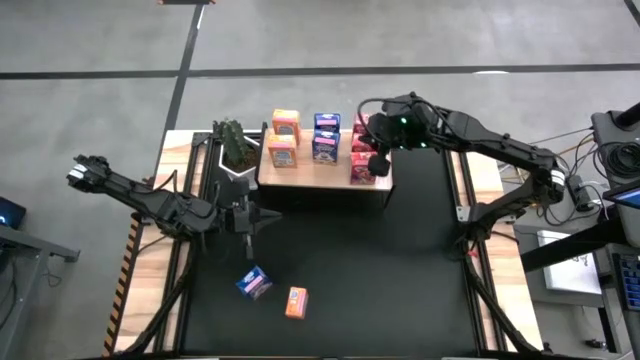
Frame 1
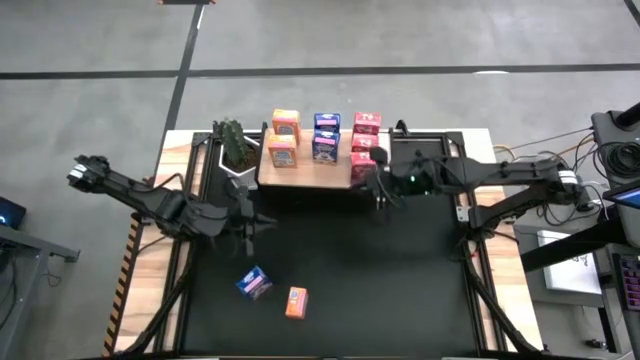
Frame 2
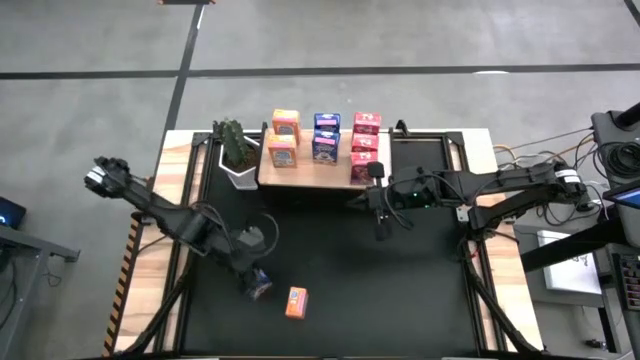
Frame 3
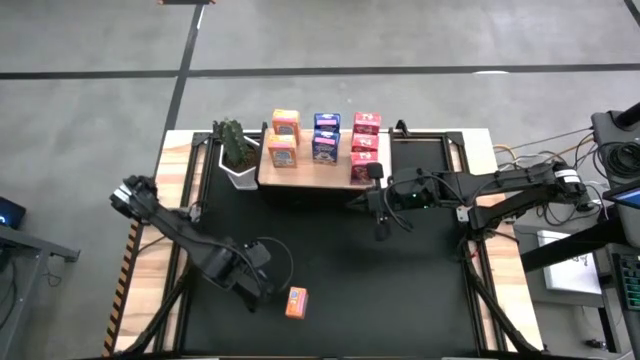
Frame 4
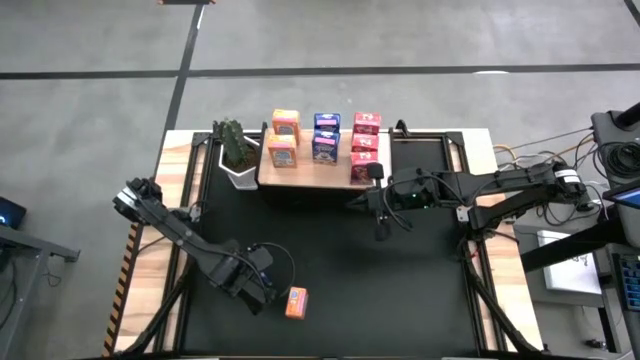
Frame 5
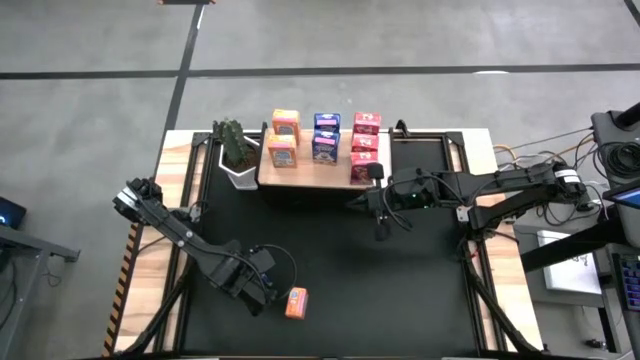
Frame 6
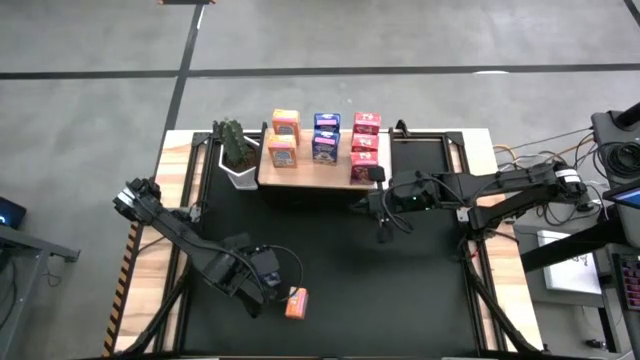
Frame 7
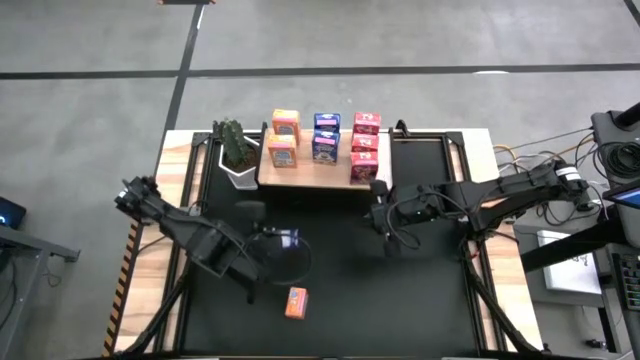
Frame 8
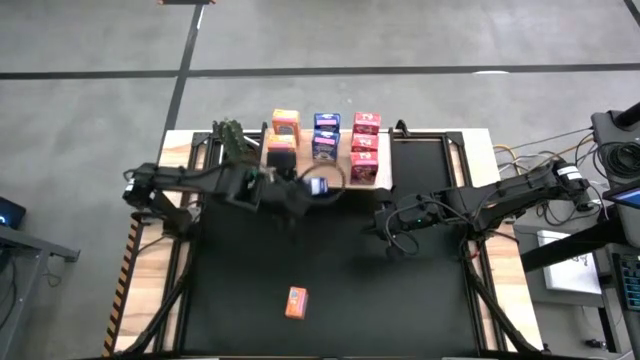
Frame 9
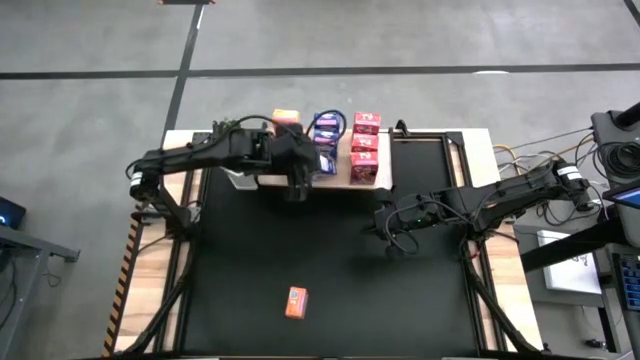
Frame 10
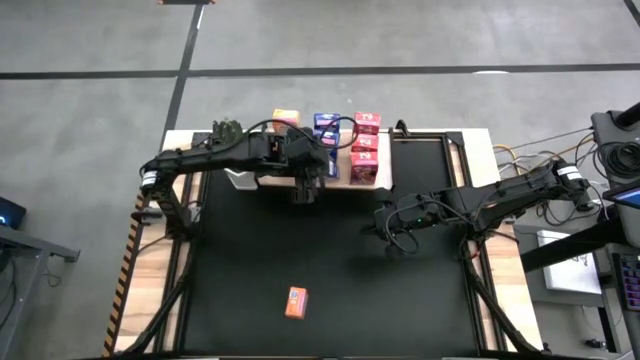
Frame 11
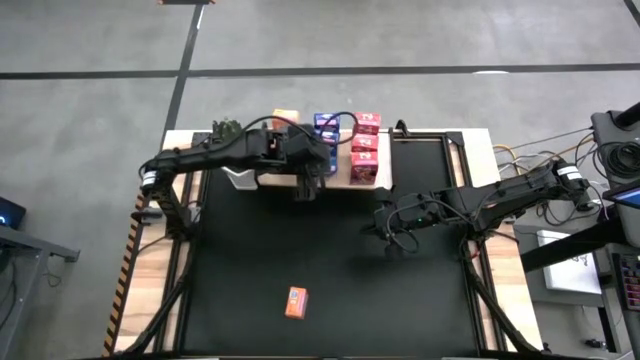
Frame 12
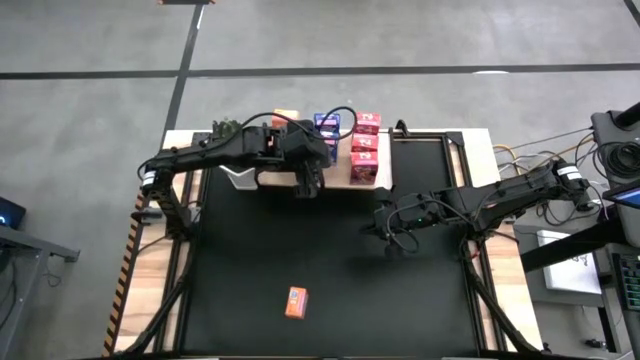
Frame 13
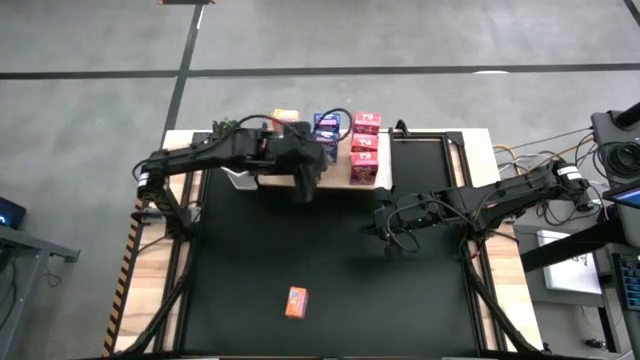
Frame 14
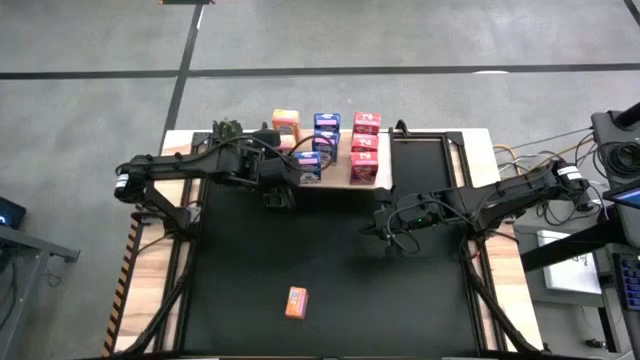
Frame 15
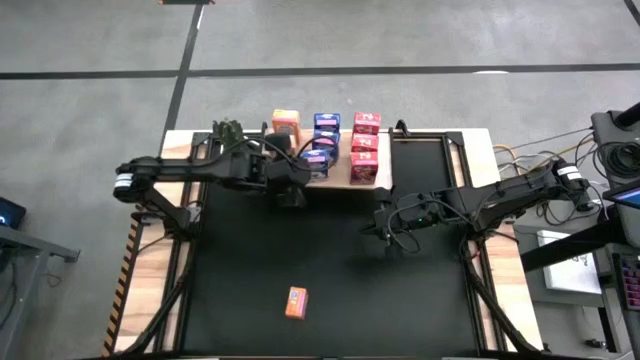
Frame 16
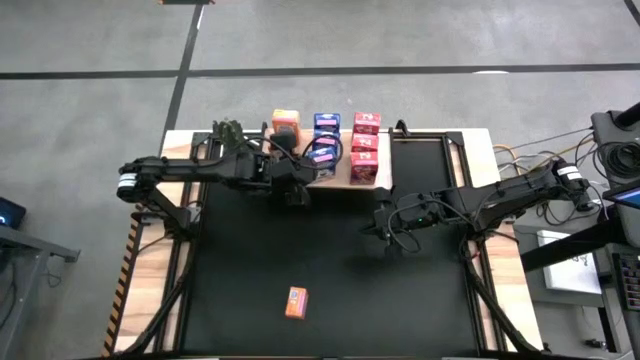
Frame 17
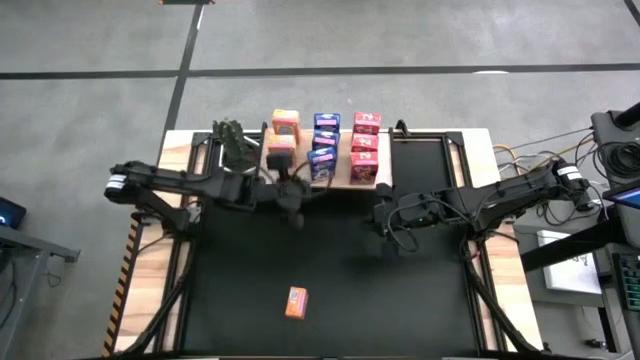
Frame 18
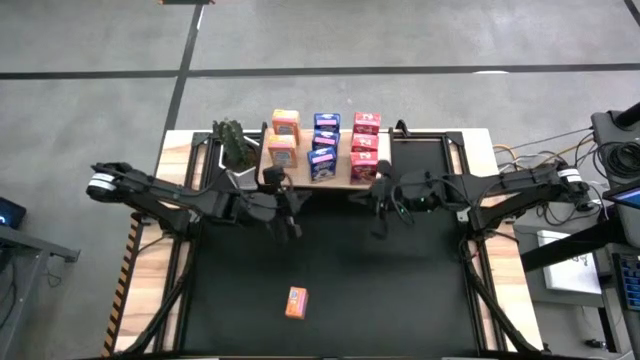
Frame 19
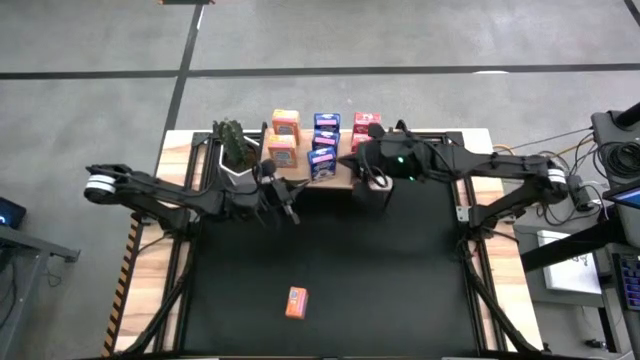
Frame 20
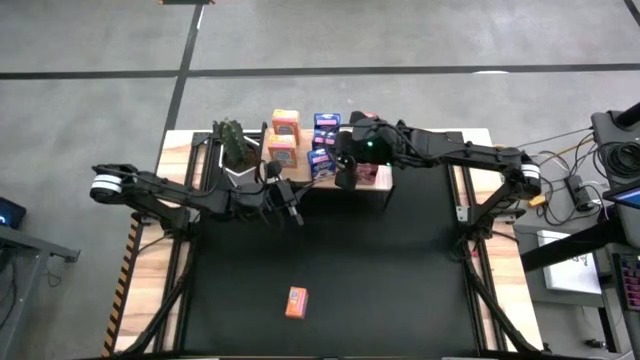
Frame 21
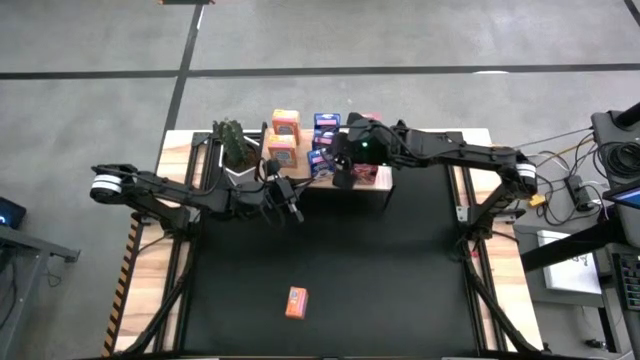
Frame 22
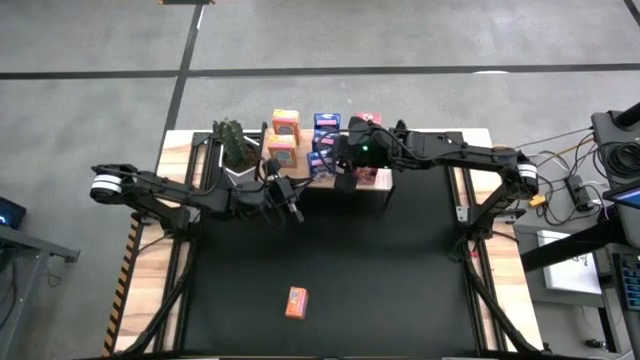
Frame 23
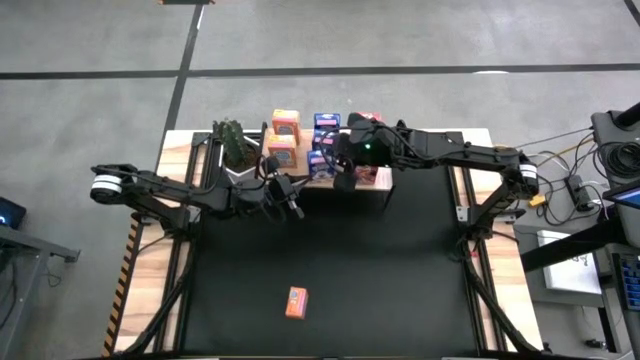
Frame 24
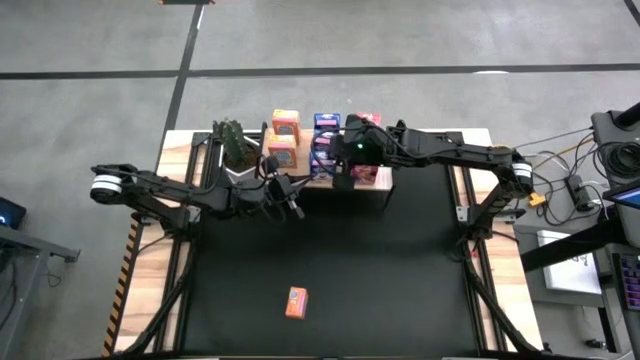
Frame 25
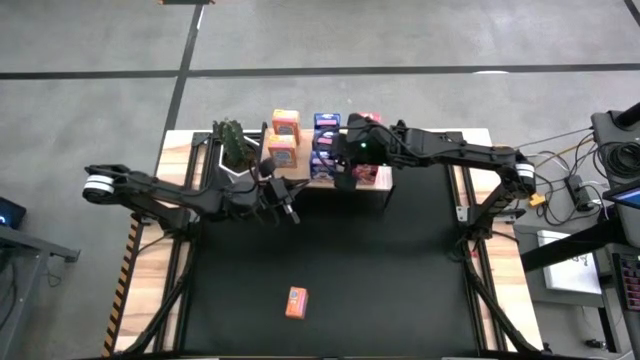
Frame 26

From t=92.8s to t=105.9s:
Task: Stack cereal on shelf
Put the blue cereal box on the shelf aligned with the other blue cereal boxes

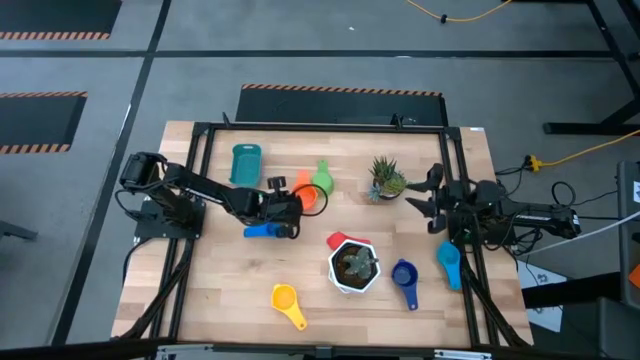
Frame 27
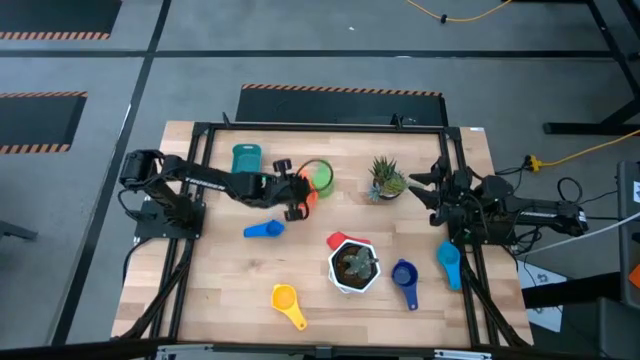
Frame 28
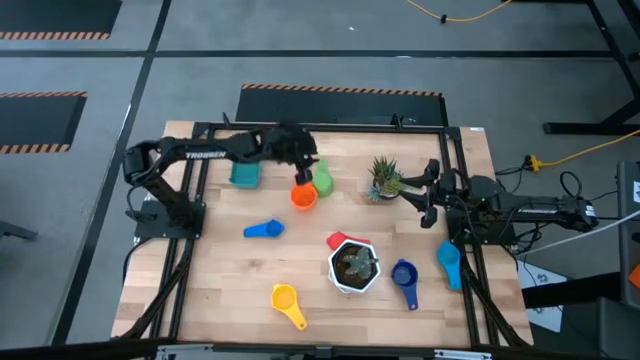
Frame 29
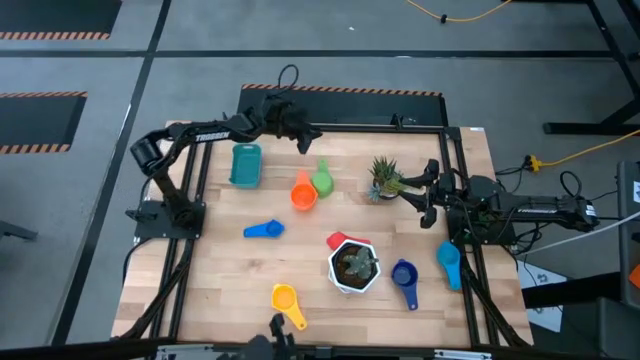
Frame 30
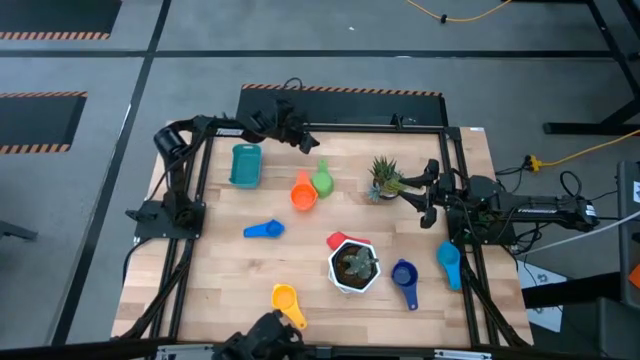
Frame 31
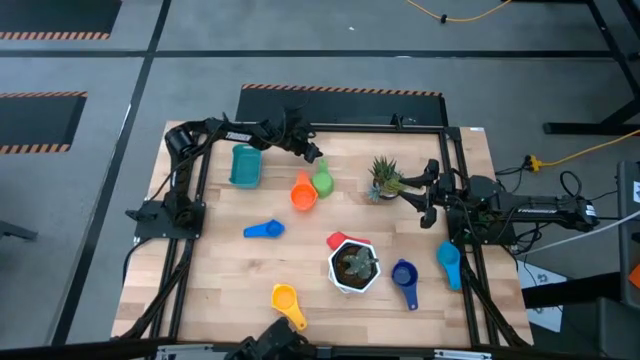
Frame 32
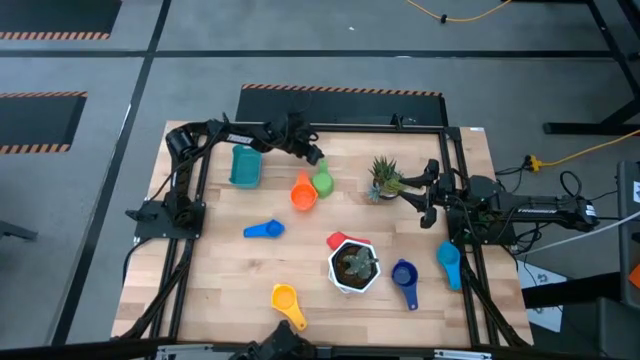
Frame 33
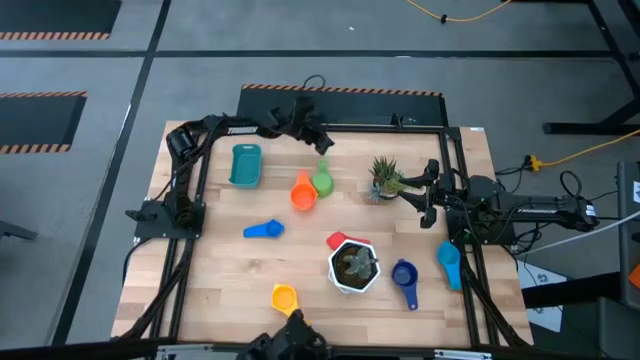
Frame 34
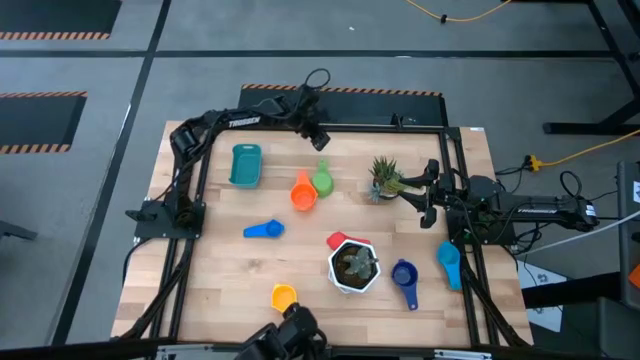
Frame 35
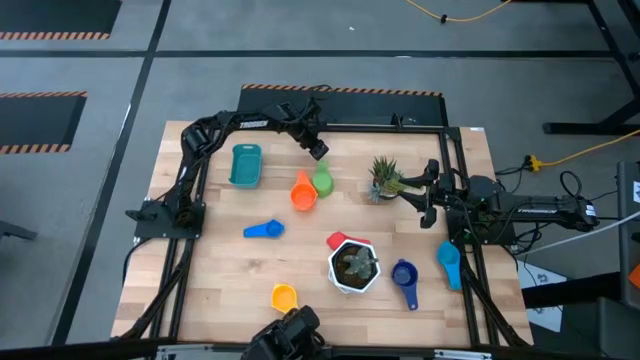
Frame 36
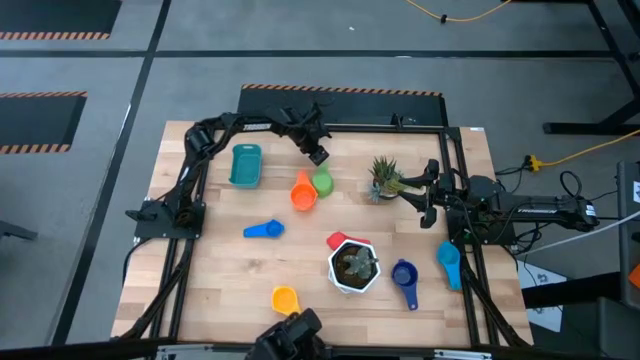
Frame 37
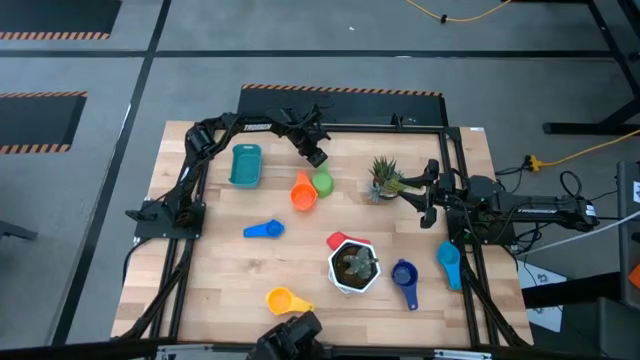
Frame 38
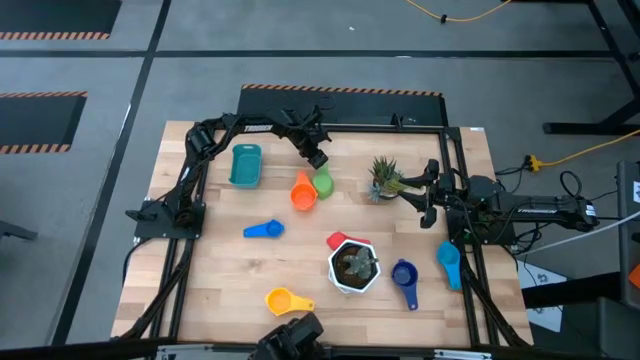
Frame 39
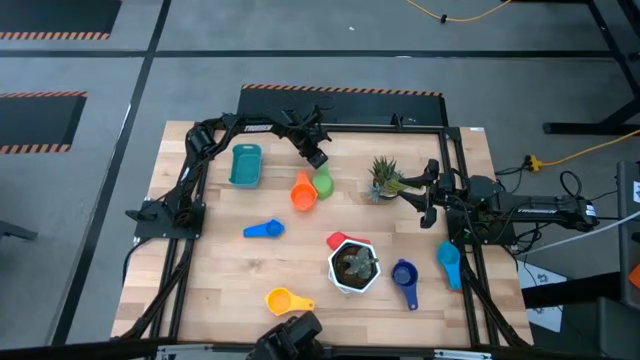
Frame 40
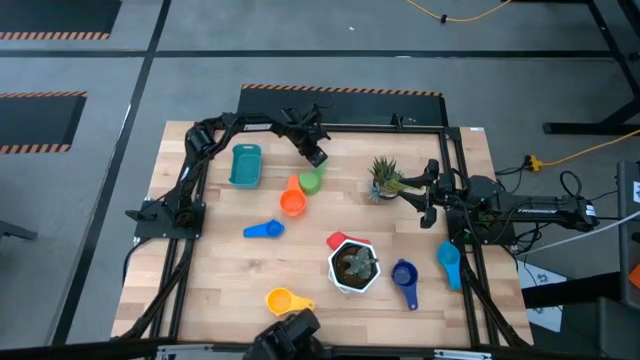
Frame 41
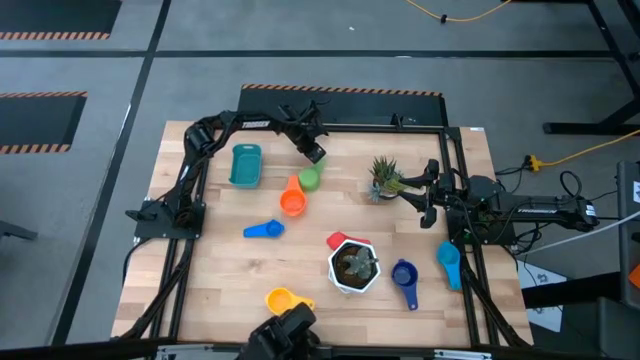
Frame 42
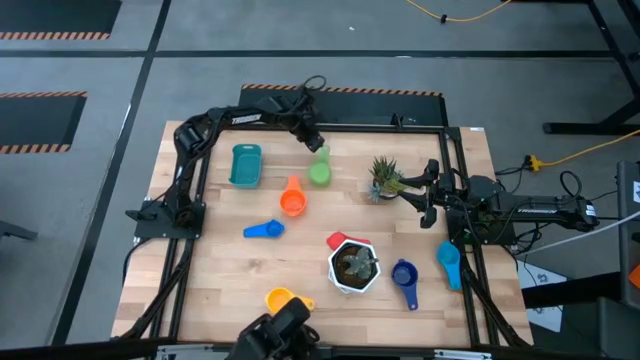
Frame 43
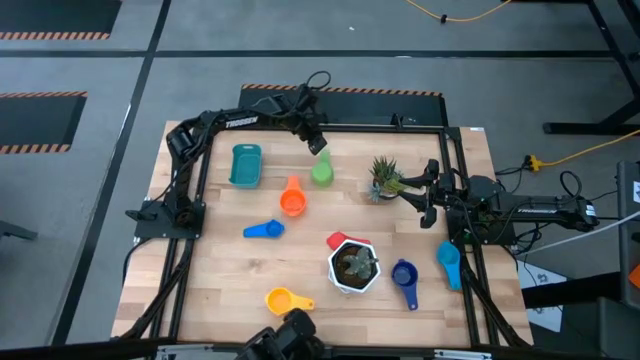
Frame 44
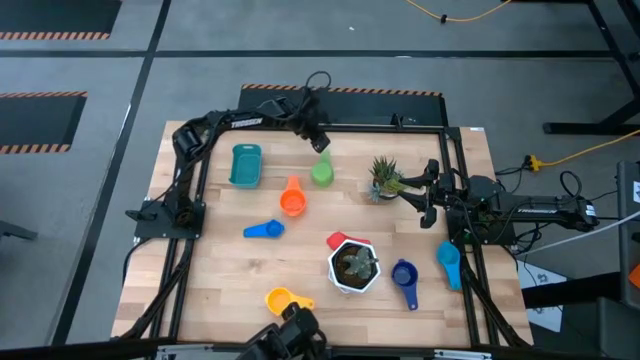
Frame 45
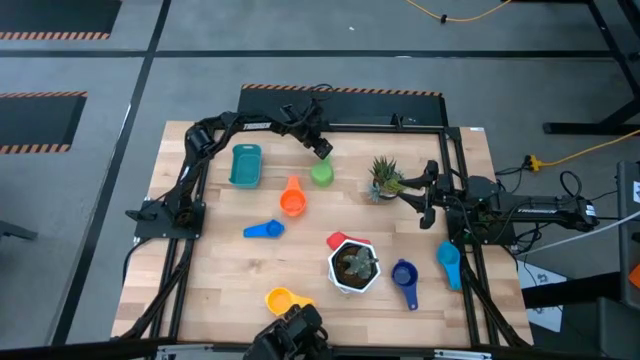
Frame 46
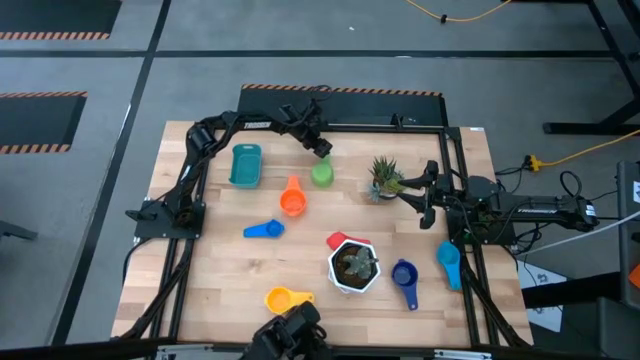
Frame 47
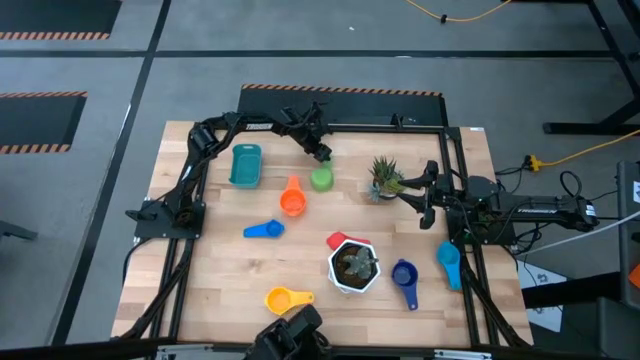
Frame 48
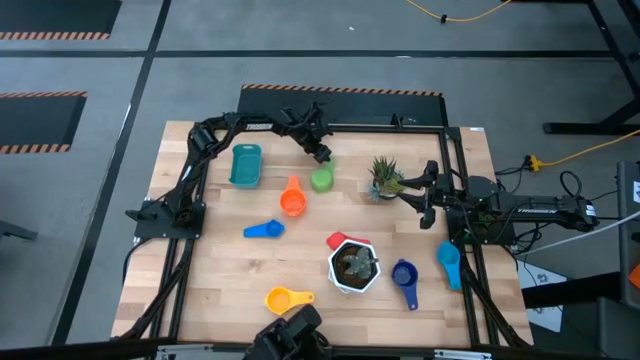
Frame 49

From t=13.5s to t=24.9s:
Task: Nest measuring cups in basket
Stack the green measuring cup into the orange measuring cup
